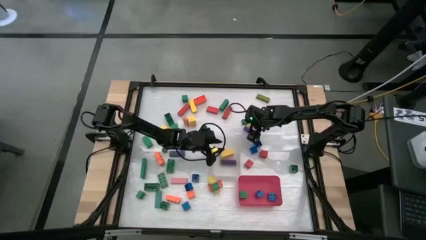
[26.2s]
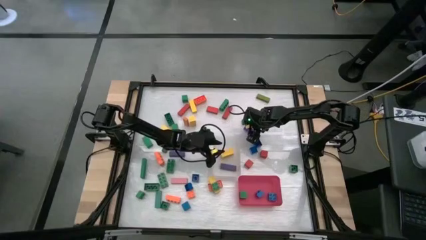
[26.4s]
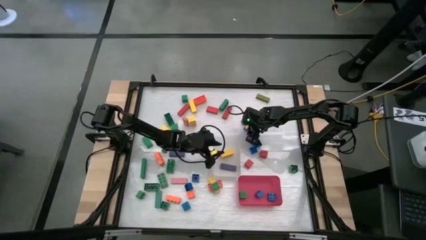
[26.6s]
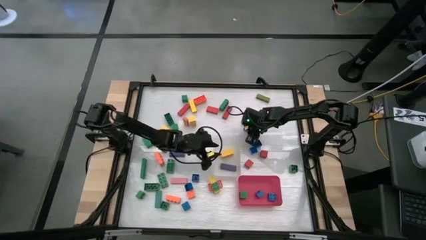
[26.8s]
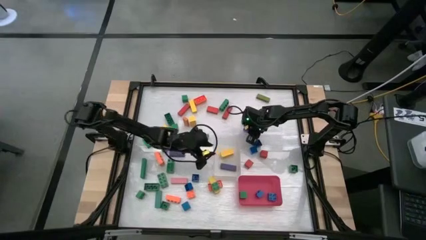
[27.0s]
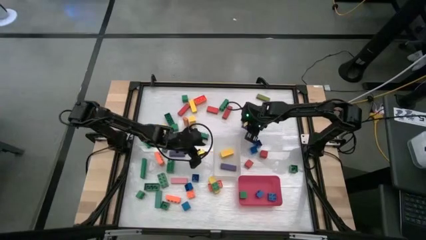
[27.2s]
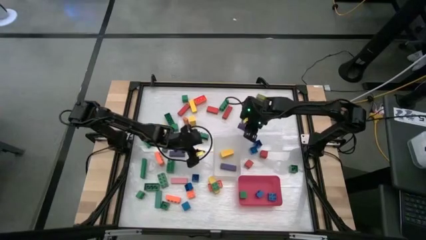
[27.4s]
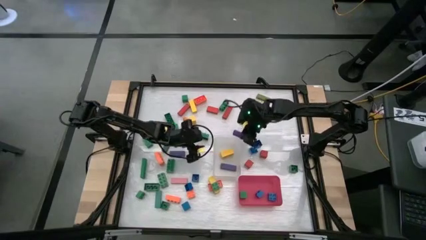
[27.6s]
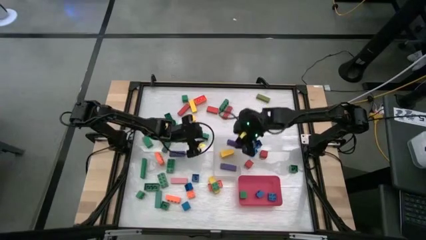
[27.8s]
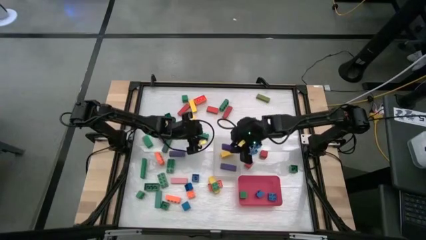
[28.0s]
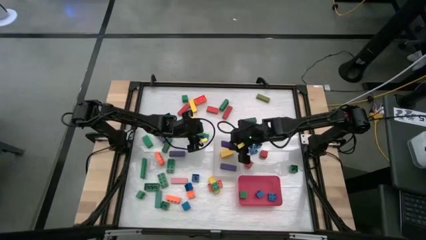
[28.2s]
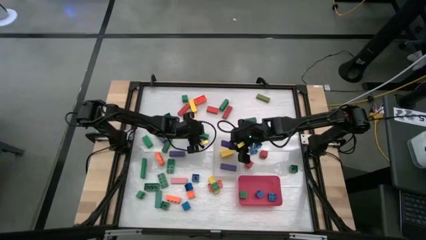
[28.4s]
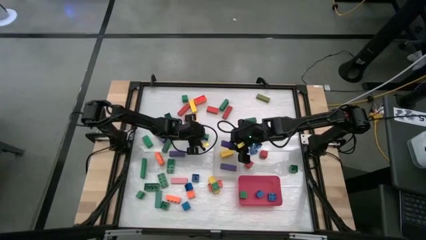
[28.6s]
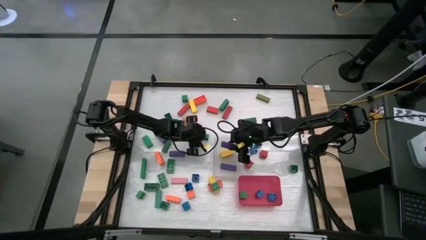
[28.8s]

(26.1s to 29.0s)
Task: Sort blocks by size
Put the purple rectangular block into the transparent bin

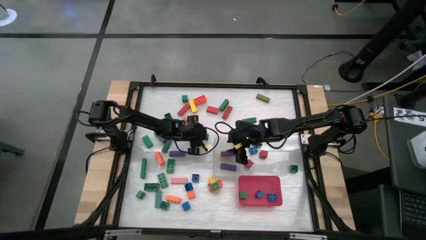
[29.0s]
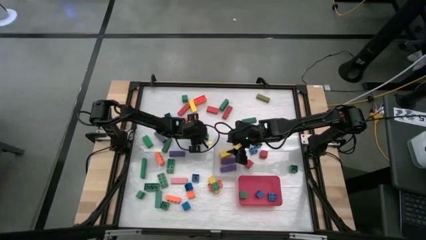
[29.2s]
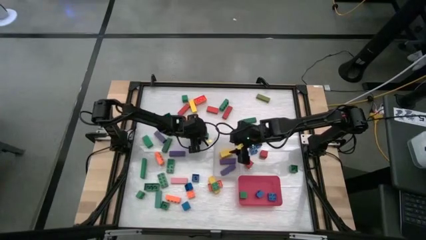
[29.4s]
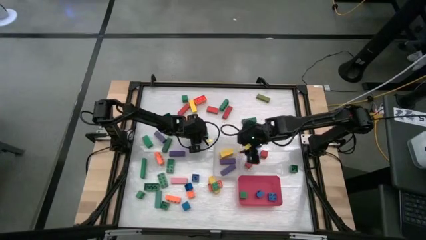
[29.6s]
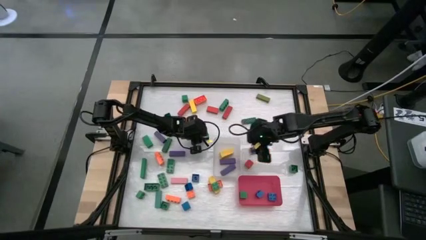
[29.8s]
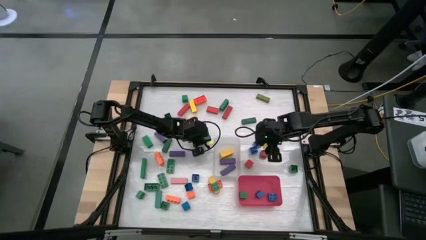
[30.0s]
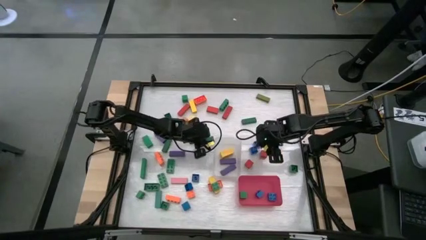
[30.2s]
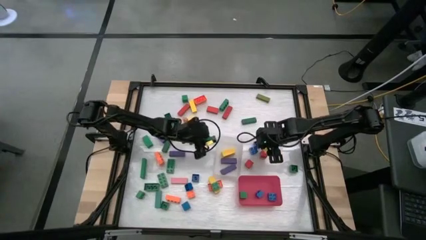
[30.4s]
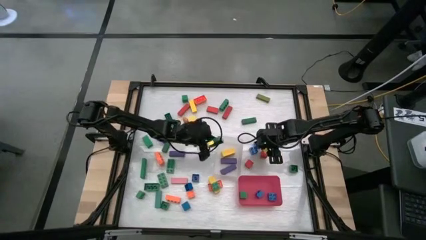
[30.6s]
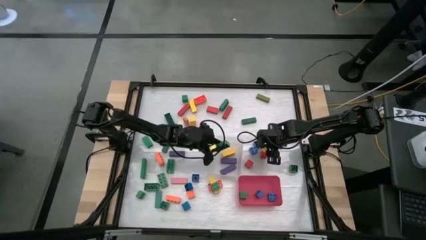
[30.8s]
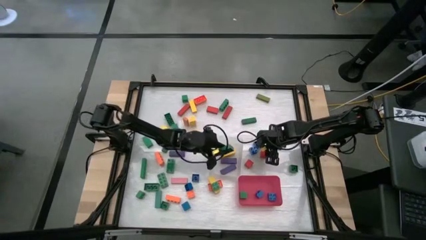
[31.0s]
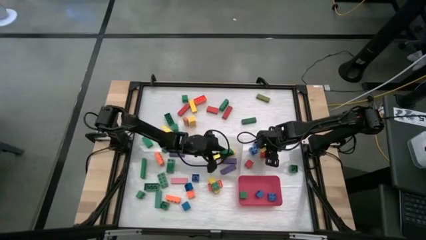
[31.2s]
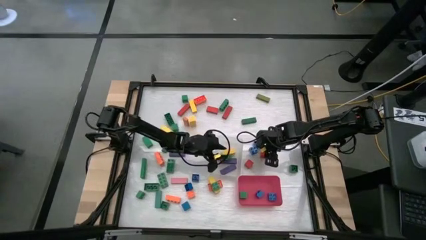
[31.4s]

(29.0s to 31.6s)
Put the green rectangular game piece into the transparent bin

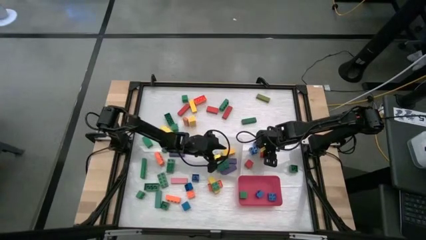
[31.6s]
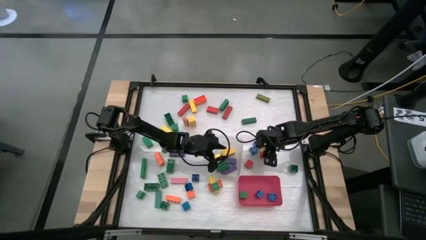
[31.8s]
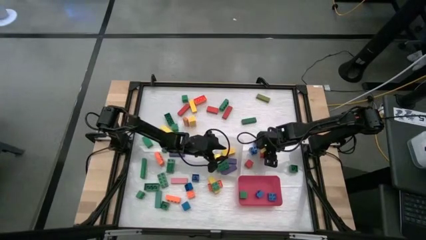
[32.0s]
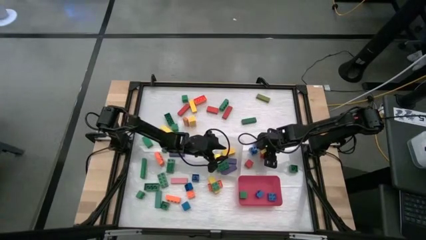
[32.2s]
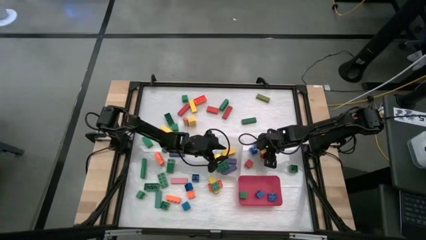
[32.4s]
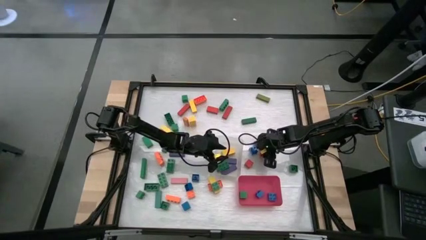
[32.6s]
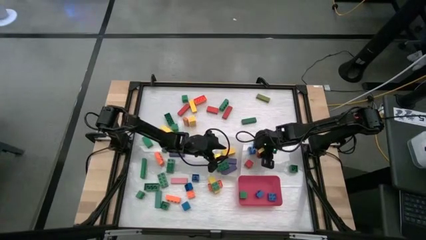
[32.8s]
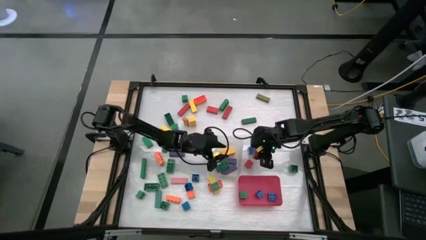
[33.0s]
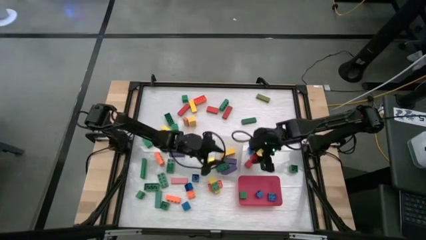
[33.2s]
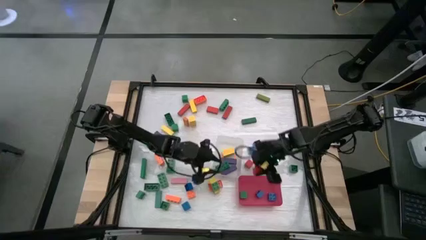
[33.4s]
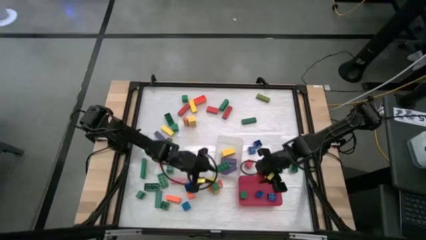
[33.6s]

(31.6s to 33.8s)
Put the red square block into the red bin

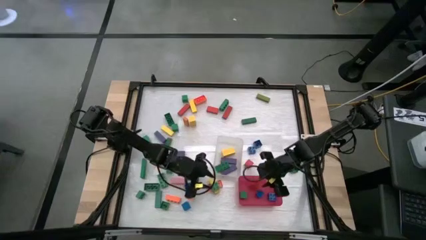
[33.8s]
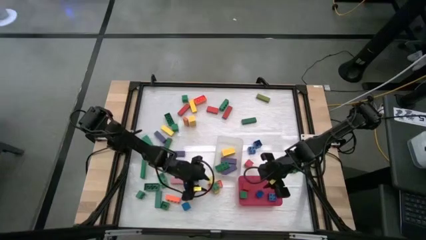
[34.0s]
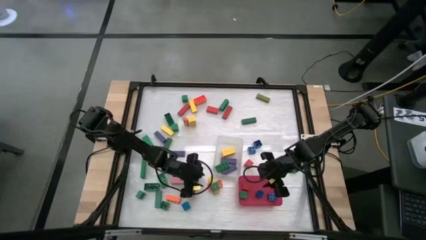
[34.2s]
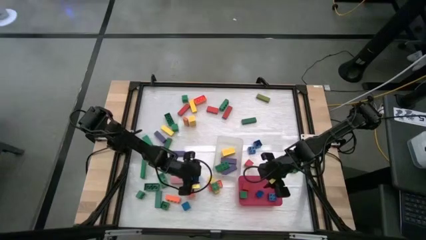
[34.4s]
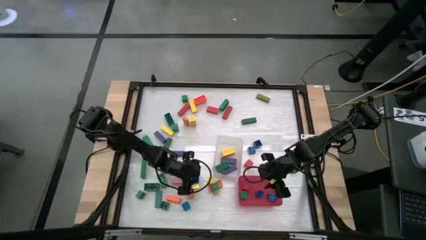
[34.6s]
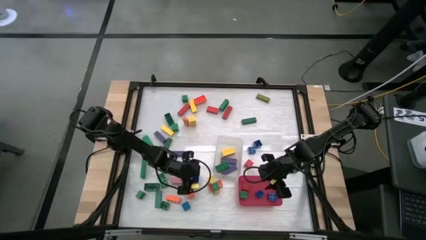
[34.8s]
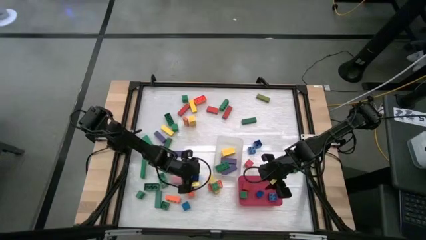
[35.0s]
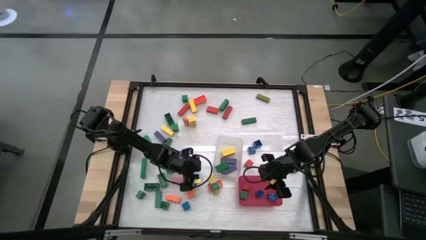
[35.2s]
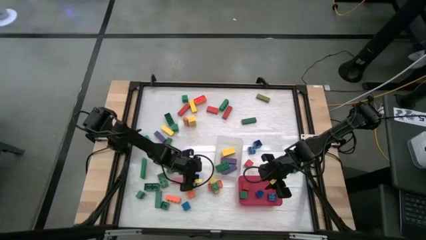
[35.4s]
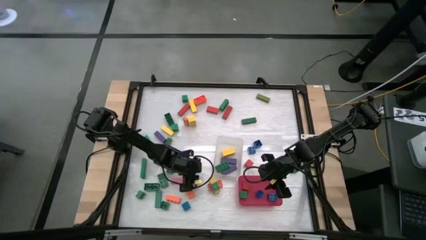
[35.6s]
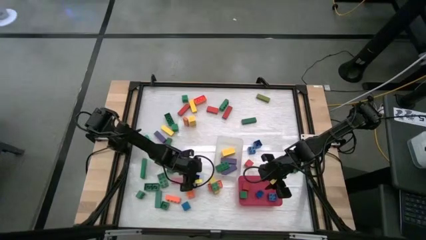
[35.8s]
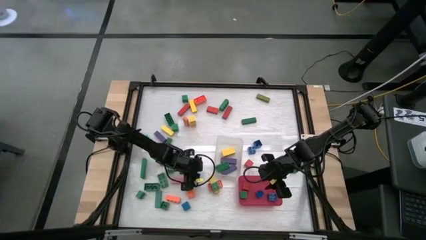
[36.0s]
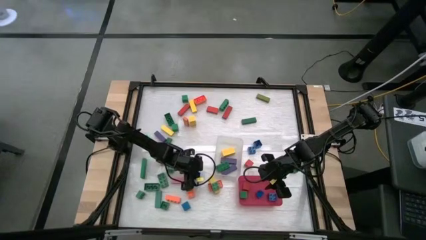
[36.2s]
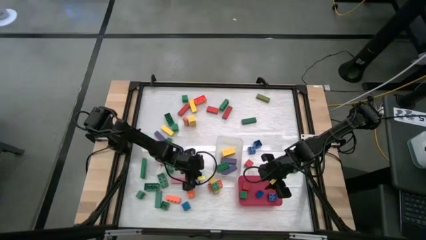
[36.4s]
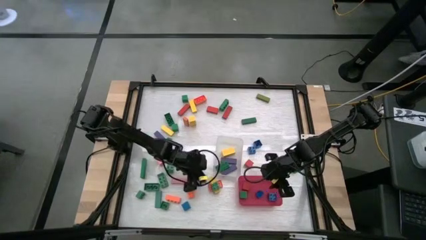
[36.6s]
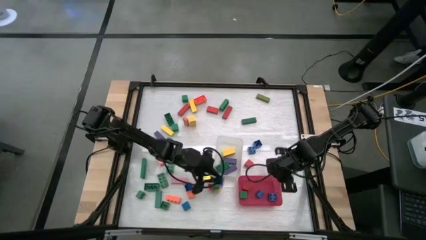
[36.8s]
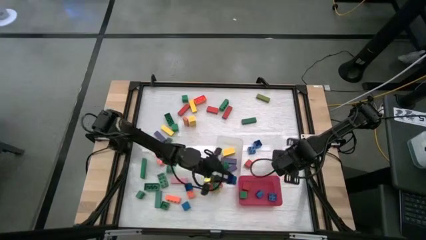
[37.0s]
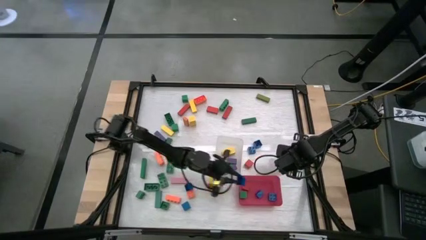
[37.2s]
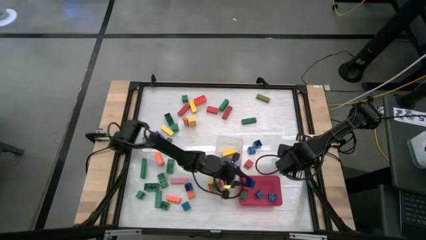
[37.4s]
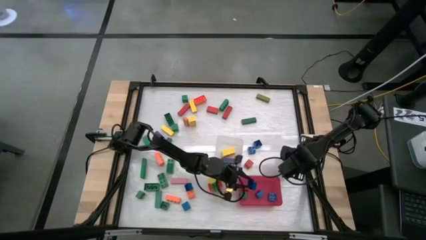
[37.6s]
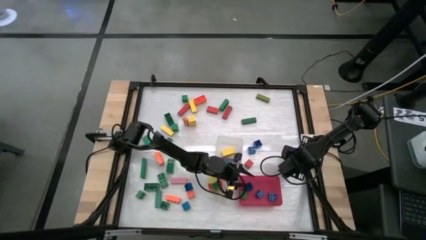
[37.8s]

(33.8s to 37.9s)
Put the blue square game piece into the red bin

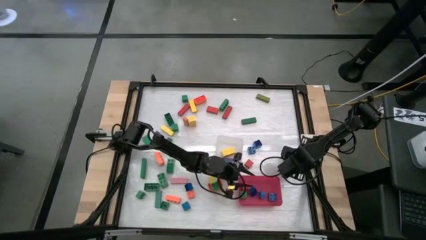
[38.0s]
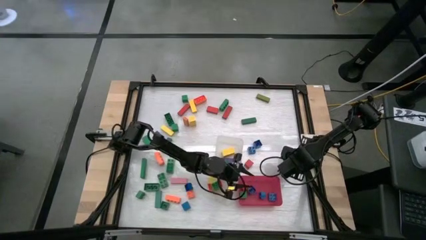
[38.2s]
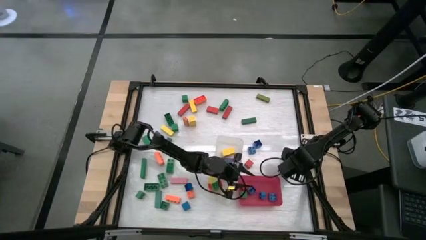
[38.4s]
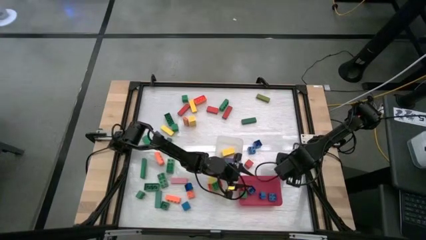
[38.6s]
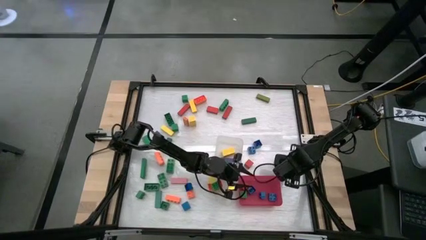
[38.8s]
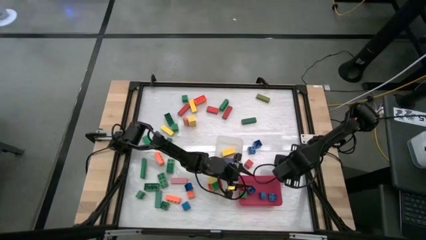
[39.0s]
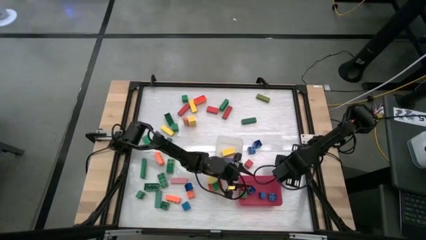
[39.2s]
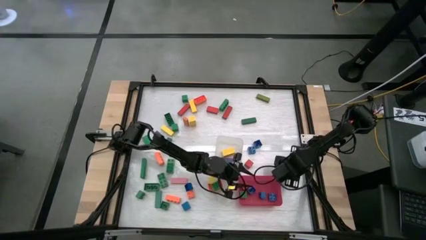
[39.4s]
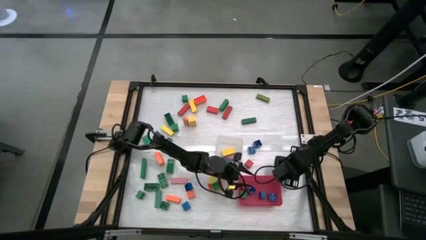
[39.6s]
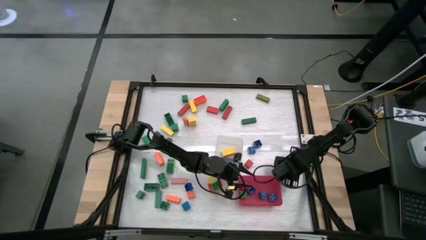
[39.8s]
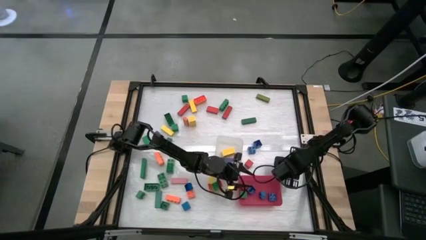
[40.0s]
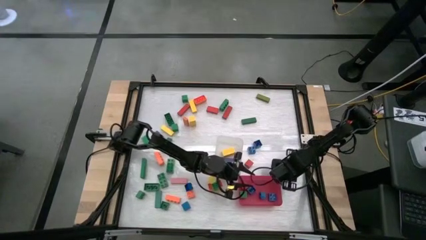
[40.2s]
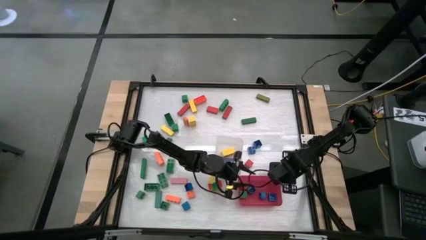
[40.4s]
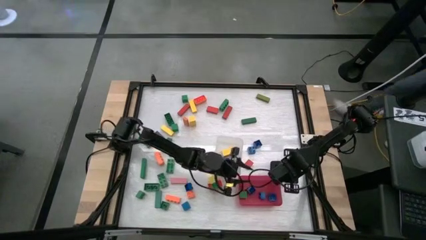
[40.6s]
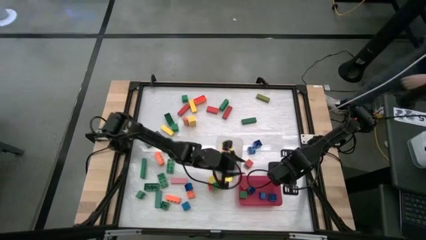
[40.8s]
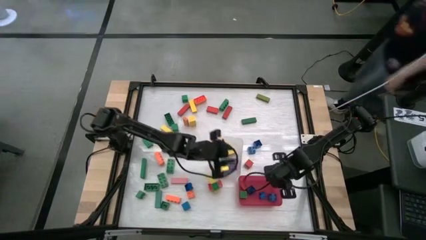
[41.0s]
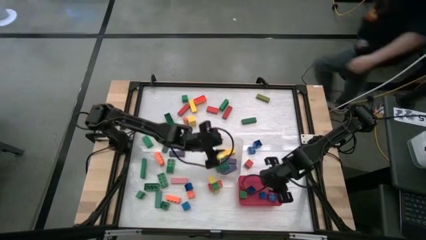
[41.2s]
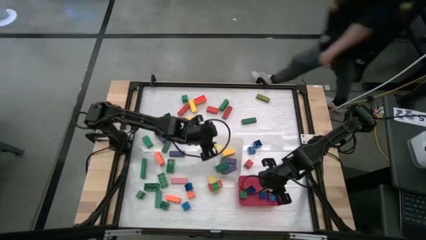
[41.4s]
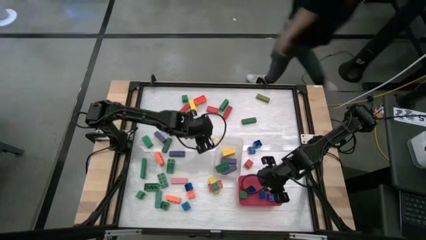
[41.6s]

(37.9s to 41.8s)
Put the green square game piece into the red bin
